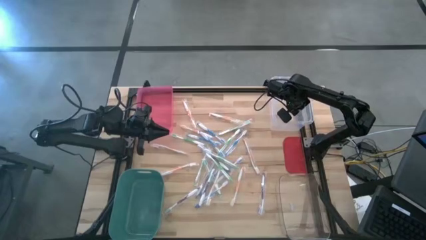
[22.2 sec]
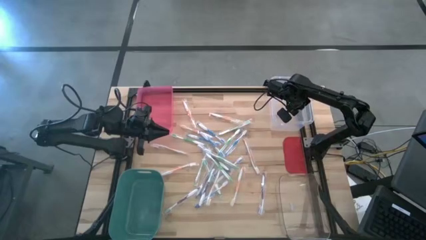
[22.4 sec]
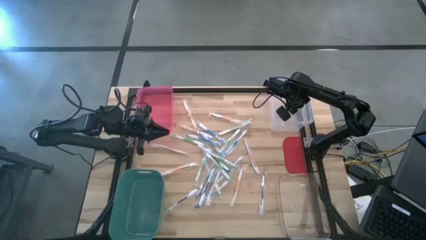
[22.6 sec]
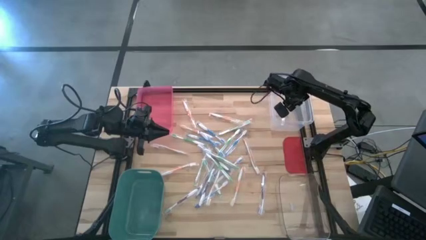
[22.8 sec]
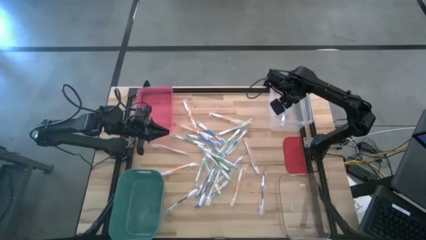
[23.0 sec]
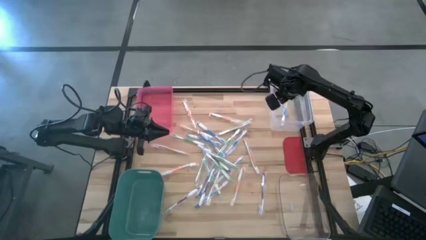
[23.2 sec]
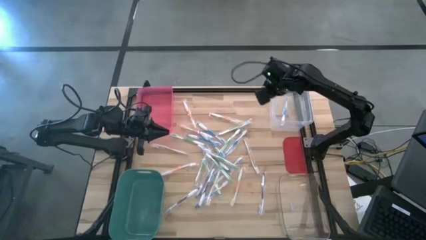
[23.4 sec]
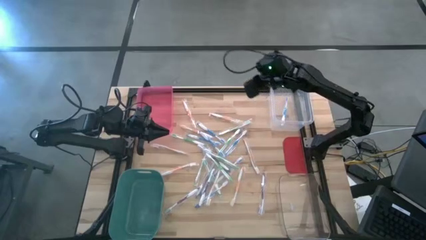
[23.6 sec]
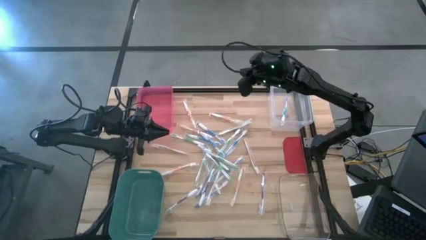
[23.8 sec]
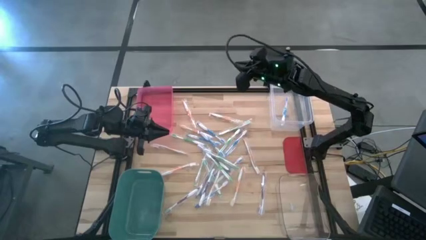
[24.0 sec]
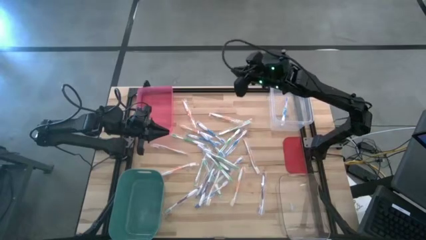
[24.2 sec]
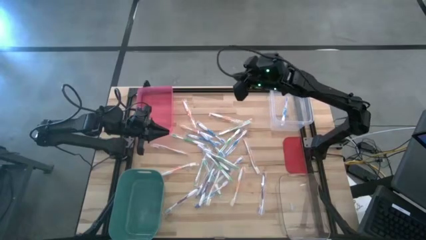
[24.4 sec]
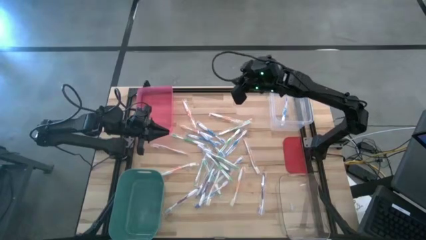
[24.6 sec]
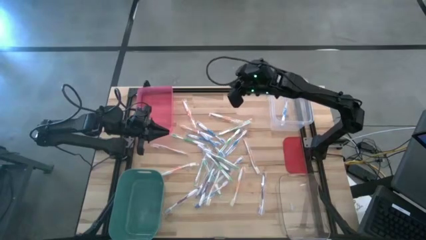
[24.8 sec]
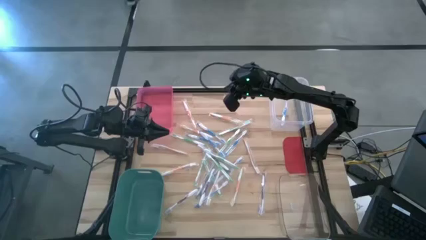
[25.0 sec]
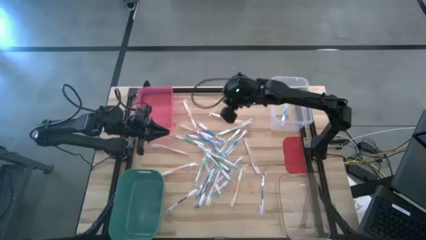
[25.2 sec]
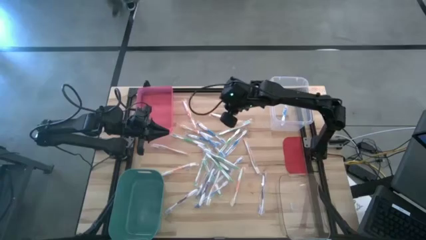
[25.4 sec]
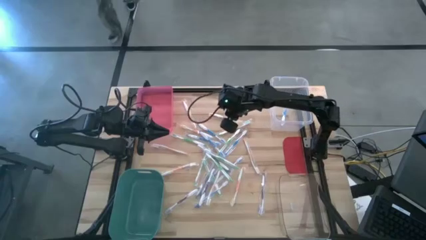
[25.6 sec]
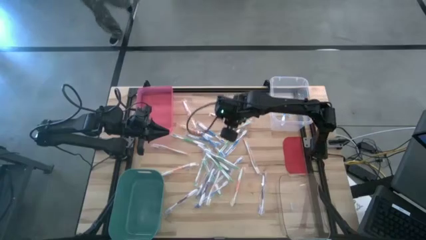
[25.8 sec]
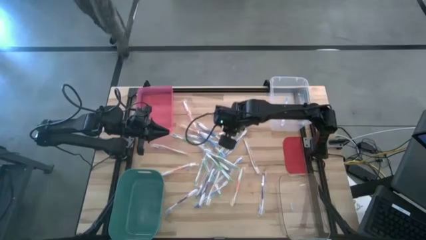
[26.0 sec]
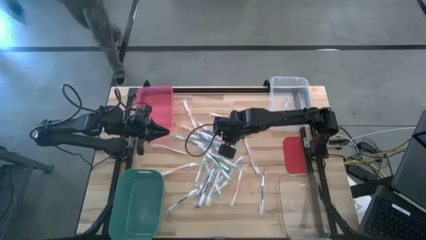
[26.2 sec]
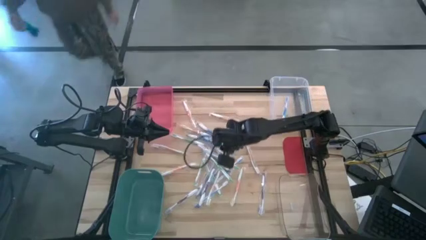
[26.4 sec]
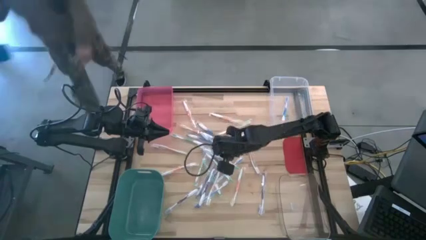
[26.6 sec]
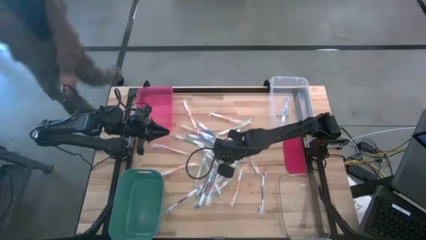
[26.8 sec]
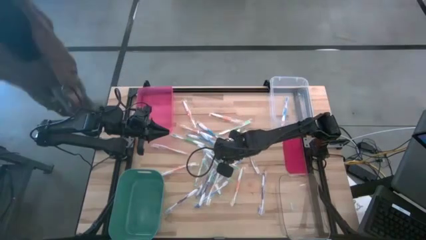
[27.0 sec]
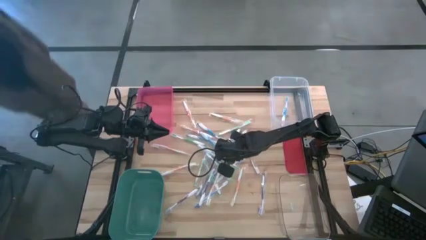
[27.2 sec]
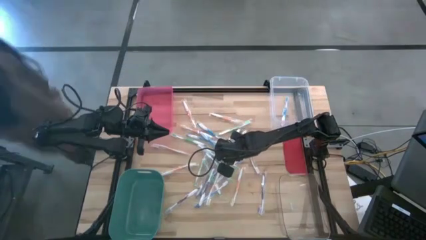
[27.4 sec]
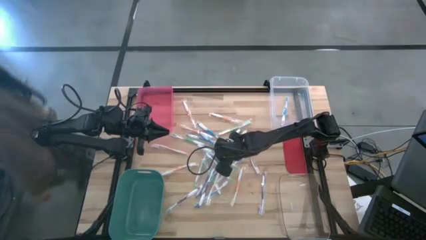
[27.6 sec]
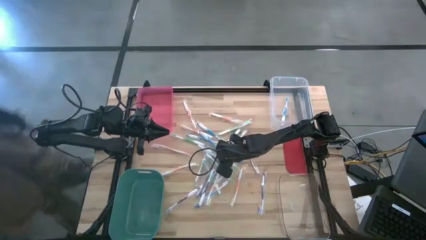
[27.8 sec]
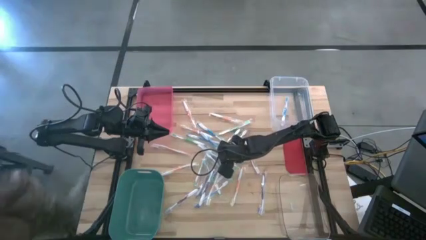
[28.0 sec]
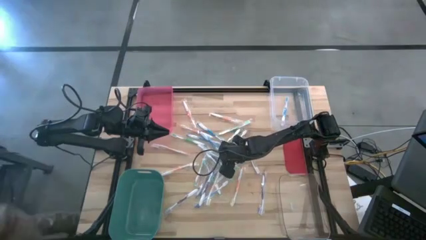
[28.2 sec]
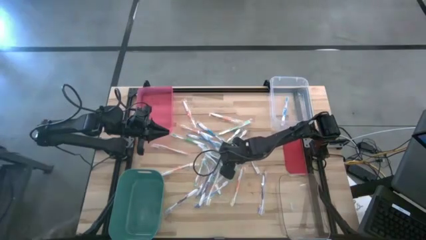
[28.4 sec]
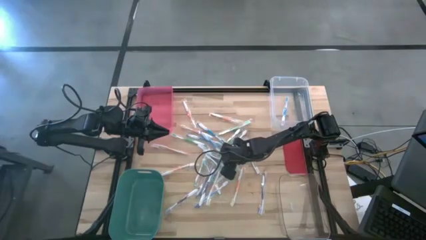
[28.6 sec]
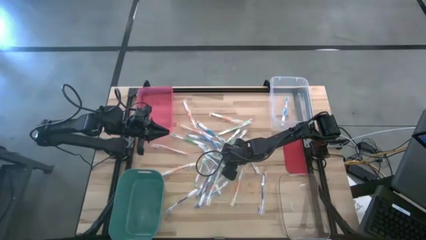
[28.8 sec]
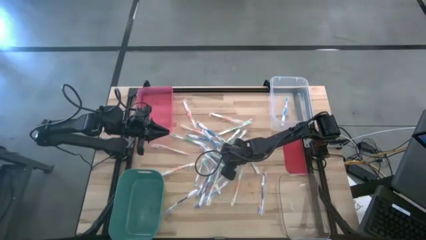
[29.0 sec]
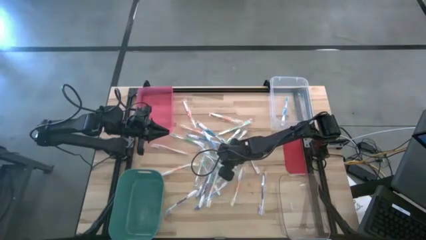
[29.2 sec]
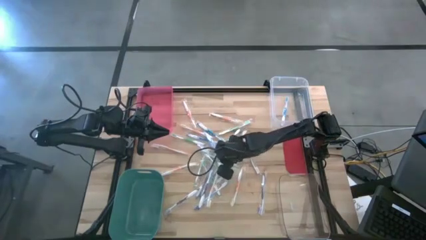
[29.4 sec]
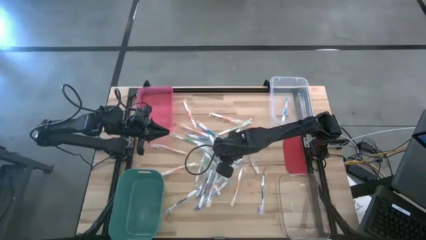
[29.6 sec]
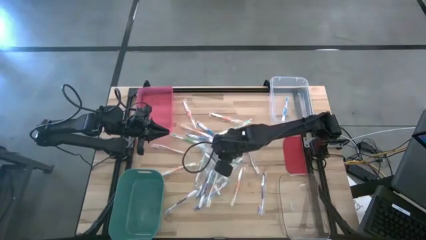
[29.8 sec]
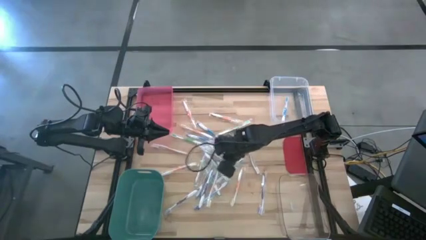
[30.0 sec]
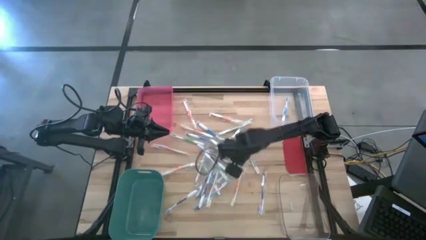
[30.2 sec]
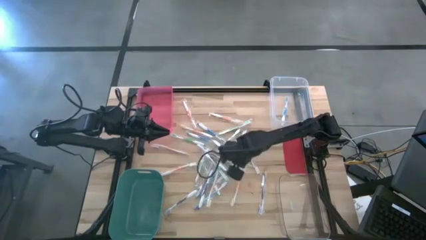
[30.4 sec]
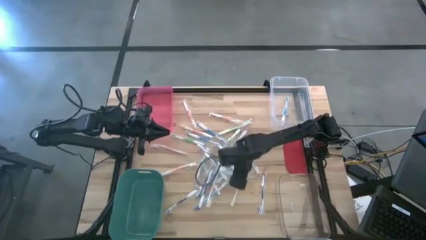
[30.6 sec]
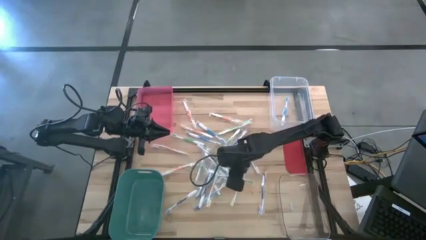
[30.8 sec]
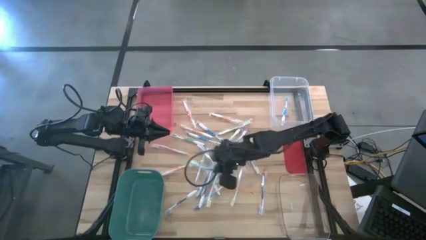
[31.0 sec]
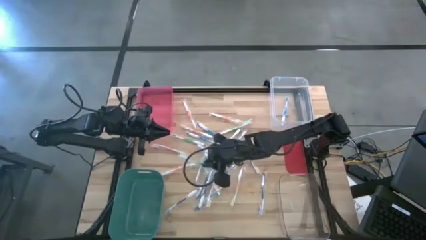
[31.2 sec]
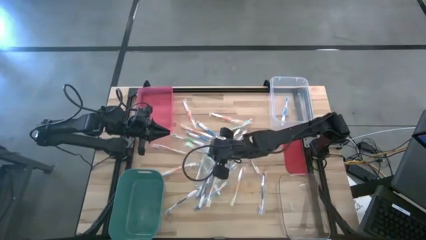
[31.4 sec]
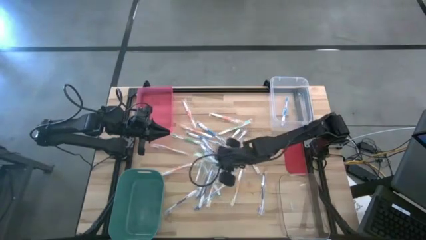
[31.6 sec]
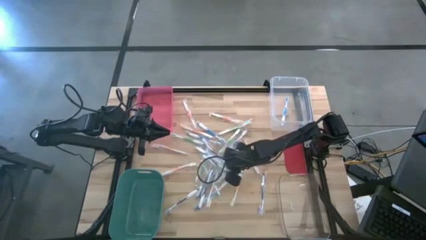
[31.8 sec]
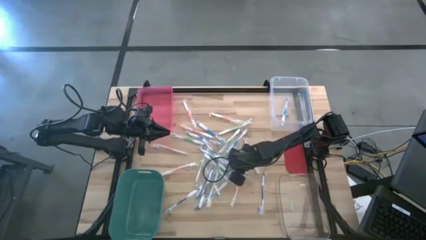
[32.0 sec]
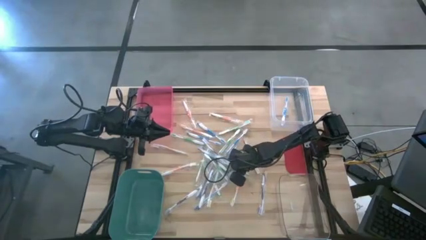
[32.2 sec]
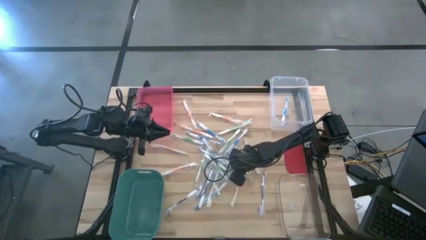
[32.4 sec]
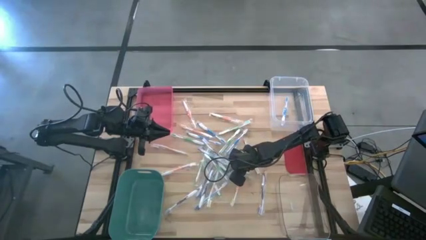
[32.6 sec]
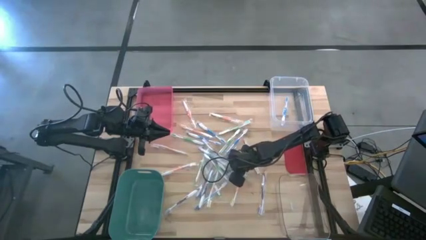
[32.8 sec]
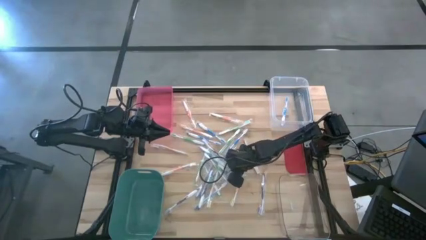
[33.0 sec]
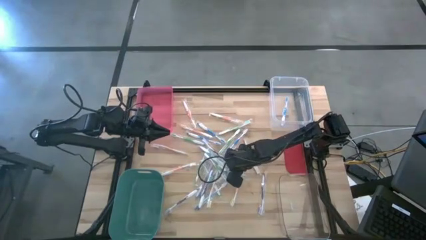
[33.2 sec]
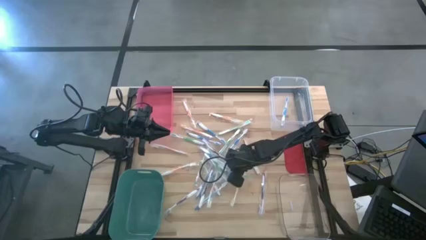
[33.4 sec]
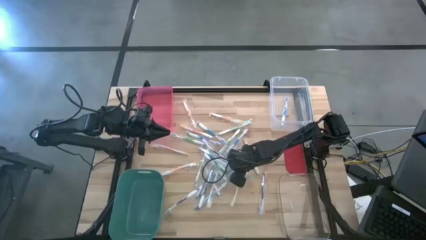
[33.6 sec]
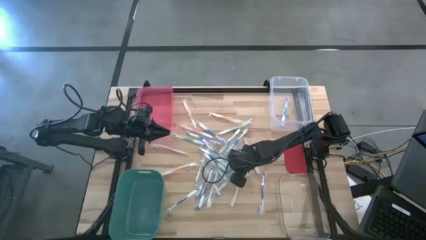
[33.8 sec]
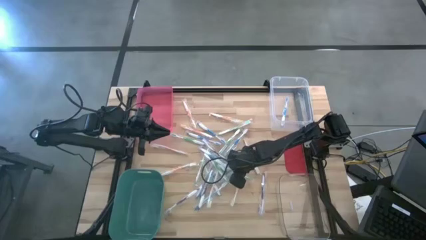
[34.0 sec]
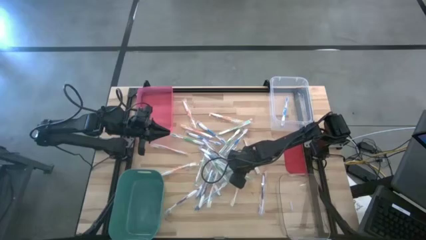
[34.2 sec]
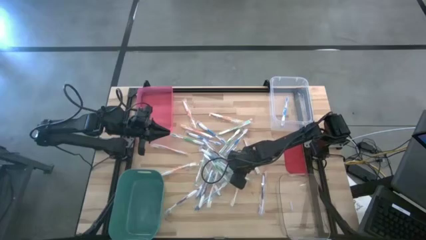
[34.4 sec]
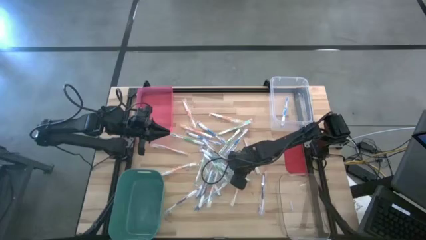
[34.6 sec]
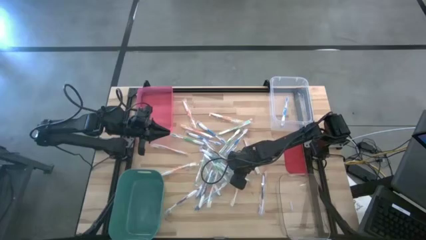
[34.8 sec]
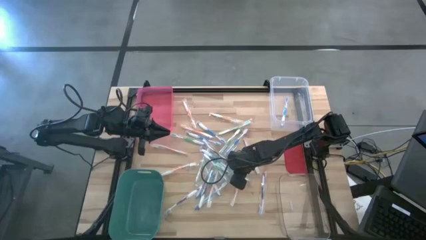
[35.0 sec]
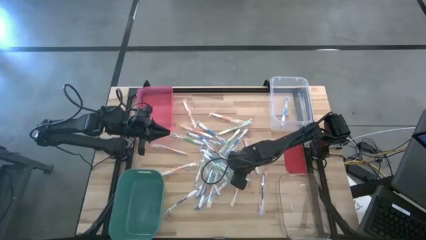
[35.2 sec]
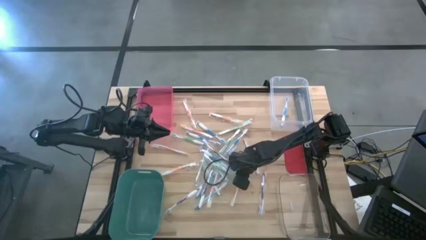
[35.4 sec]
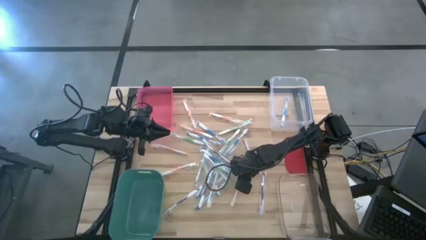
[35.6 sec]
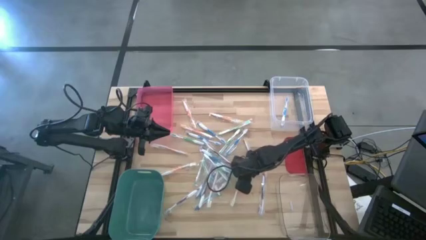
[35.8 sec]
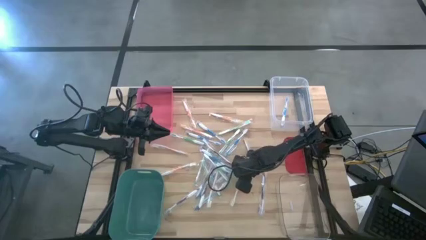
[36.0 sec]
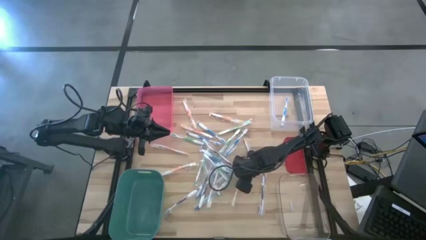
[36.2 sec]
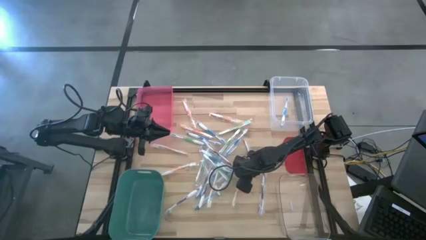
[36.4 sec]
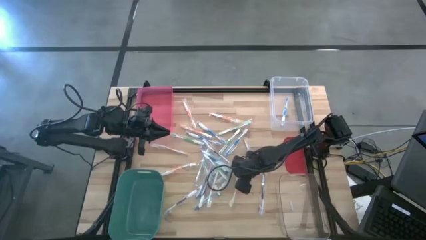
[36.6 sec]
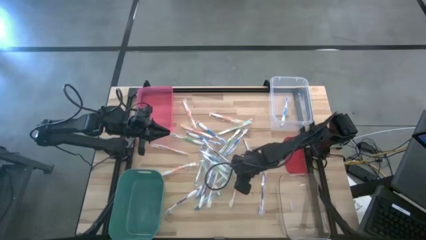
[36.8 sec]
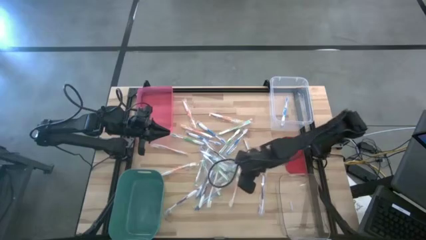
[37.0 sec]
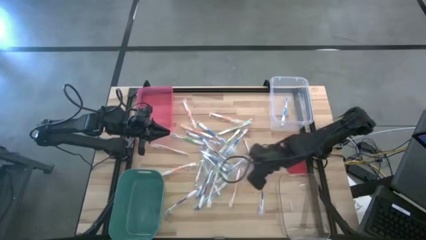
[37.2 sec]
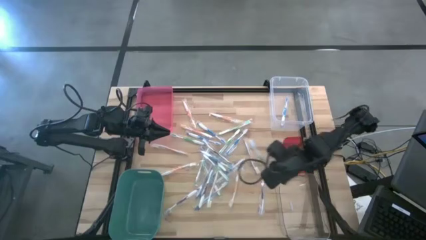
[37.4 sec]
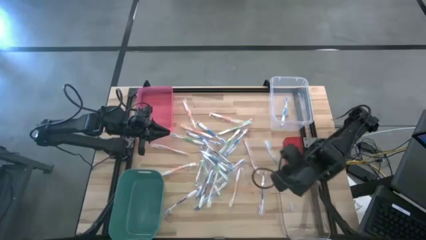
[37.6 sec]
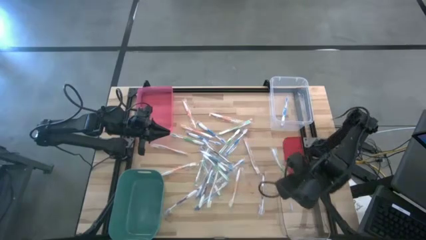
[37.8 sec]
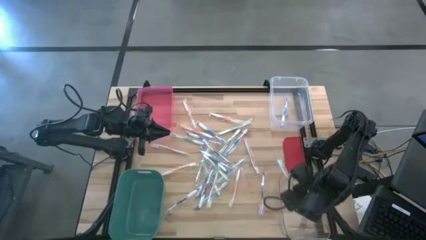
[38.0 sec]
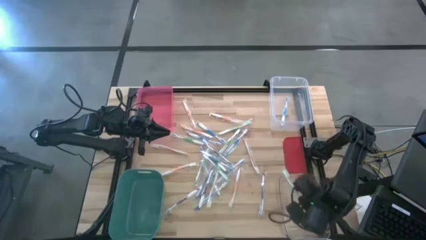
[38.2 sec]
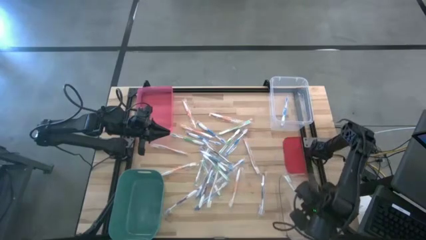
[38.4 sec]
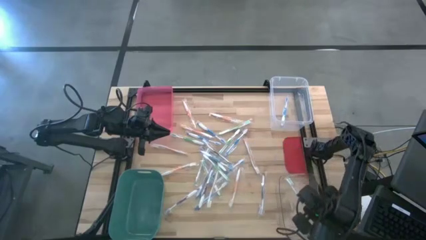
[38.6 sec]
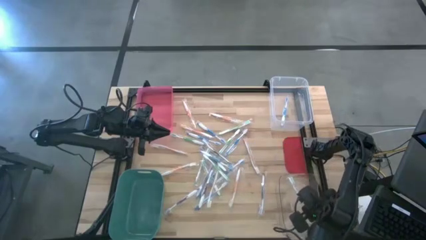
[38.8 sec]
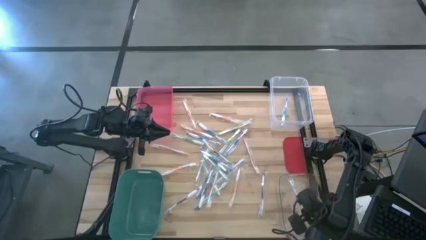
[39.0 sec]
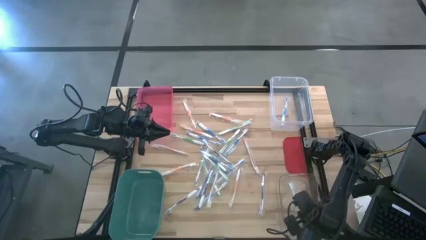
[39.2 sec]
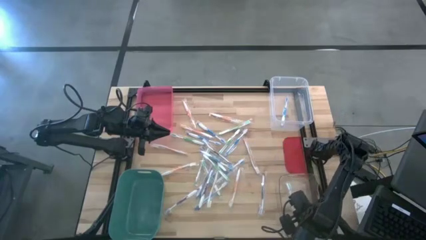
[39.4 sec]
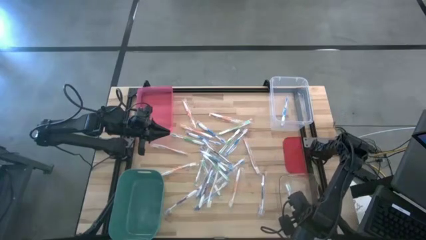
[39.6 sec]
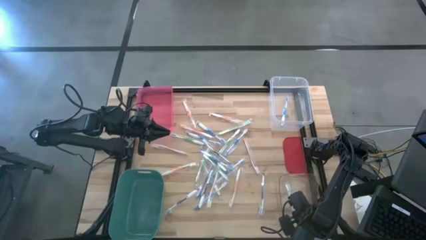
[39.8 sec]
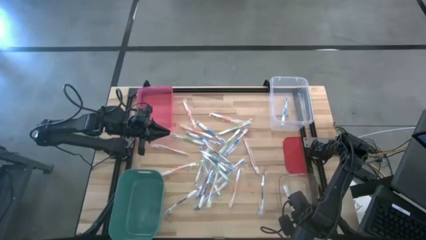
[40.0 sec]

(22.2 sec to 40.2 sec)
Task: Pick & Place Toothbrushes
Put the green toothbrush into the green bin
